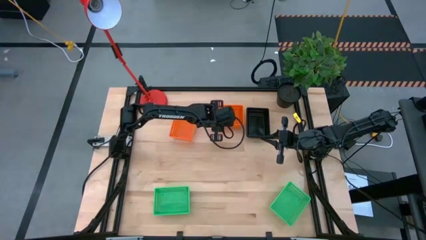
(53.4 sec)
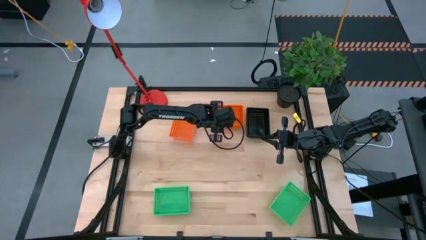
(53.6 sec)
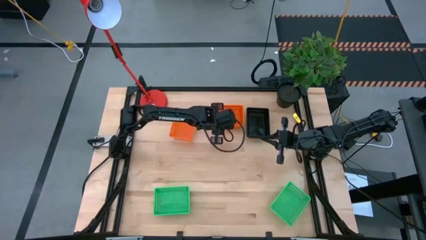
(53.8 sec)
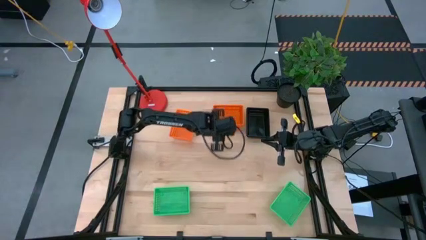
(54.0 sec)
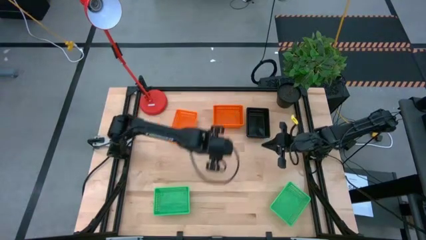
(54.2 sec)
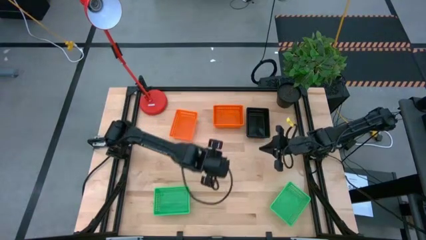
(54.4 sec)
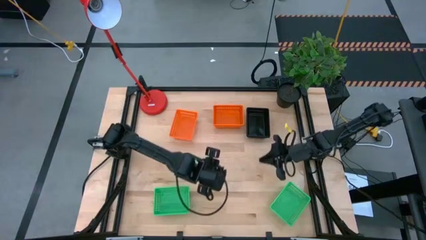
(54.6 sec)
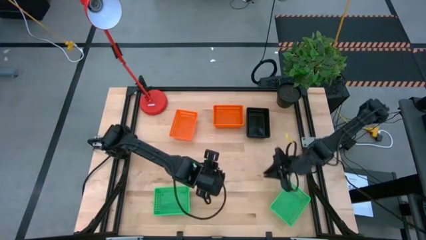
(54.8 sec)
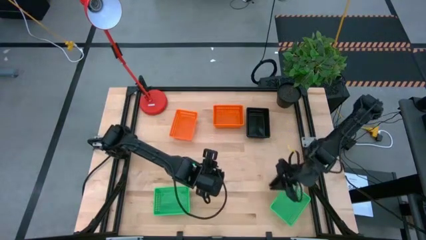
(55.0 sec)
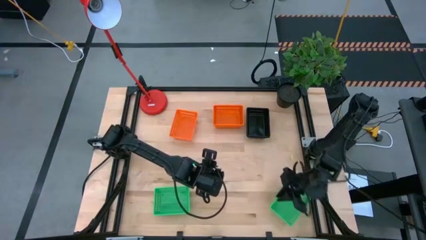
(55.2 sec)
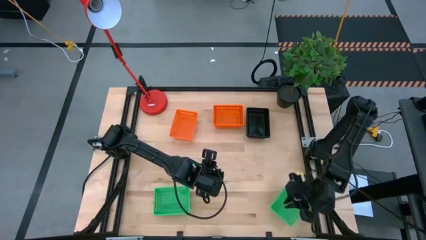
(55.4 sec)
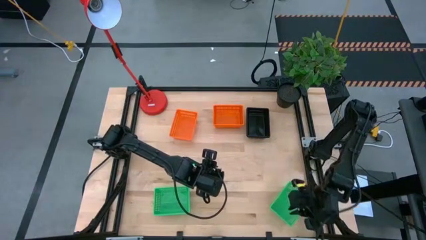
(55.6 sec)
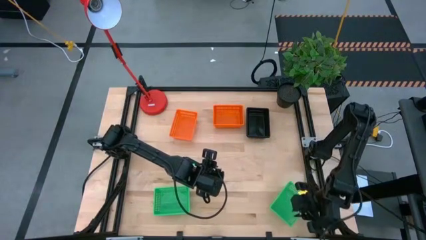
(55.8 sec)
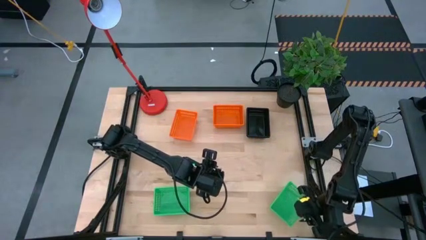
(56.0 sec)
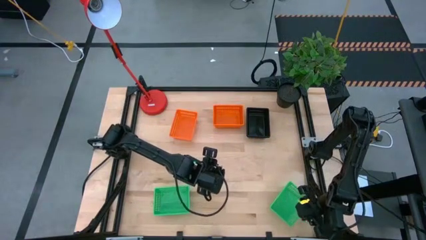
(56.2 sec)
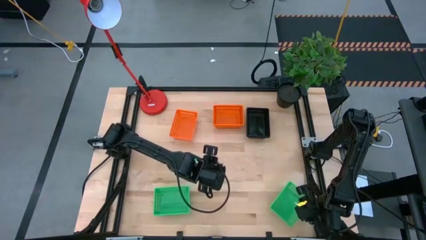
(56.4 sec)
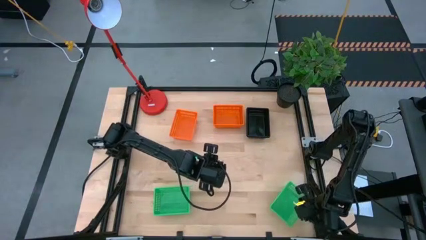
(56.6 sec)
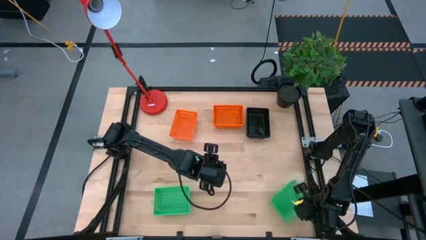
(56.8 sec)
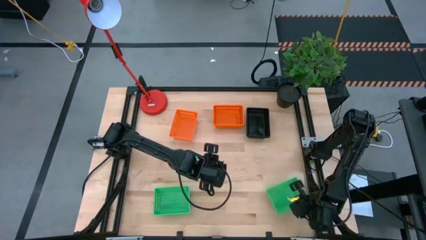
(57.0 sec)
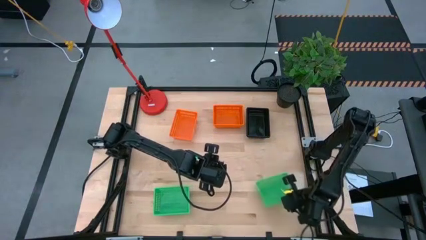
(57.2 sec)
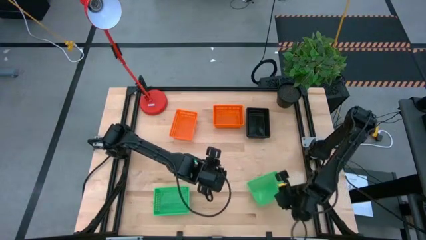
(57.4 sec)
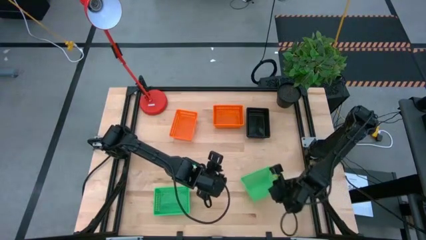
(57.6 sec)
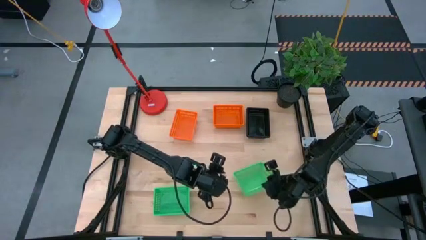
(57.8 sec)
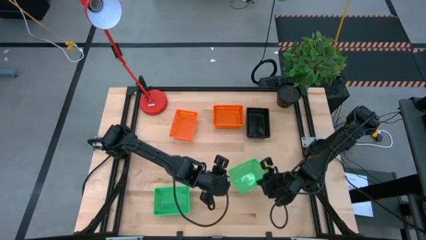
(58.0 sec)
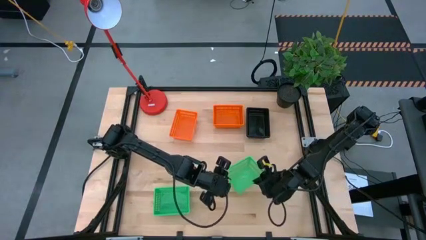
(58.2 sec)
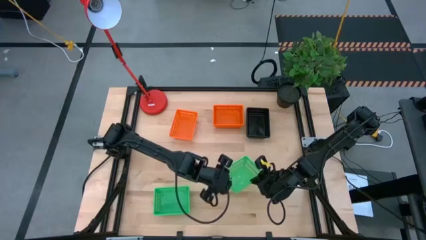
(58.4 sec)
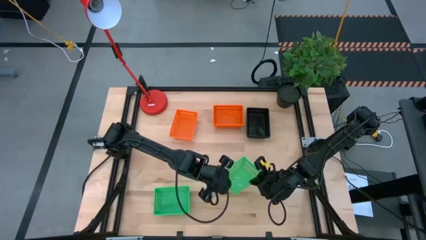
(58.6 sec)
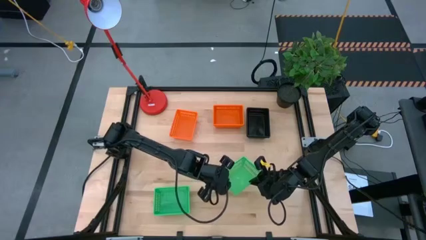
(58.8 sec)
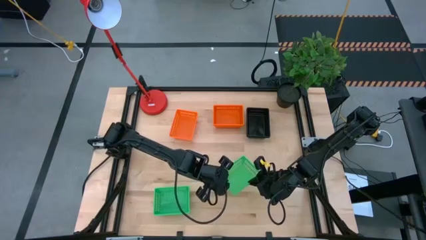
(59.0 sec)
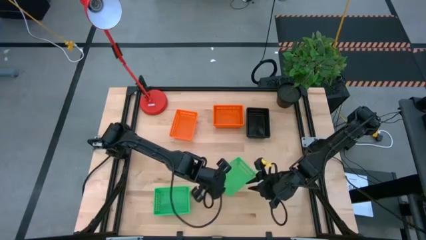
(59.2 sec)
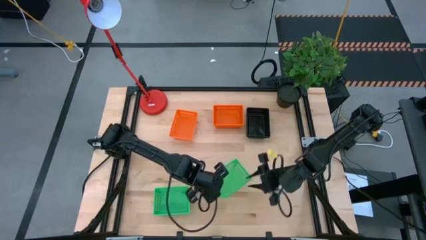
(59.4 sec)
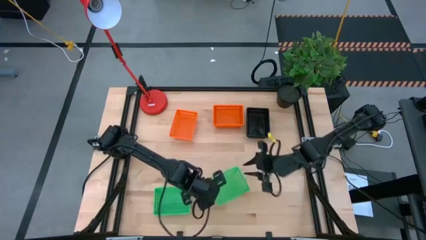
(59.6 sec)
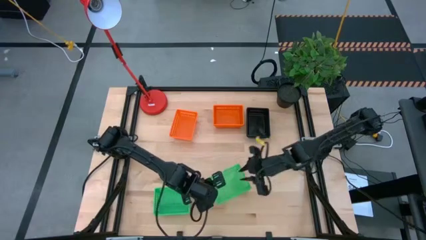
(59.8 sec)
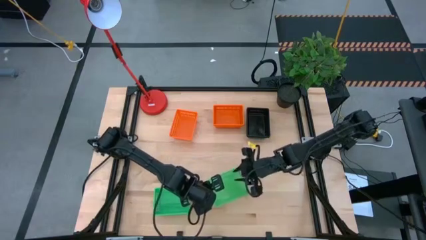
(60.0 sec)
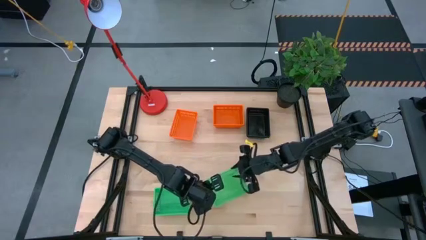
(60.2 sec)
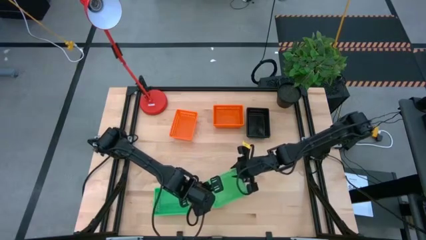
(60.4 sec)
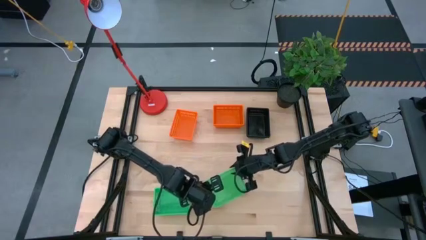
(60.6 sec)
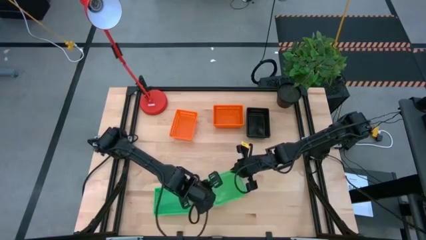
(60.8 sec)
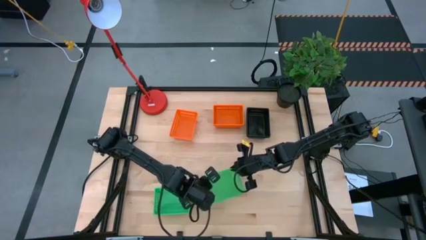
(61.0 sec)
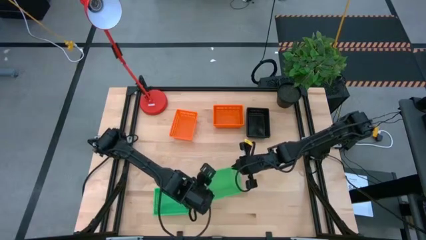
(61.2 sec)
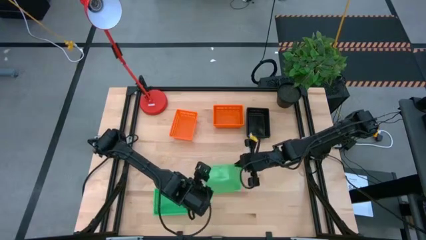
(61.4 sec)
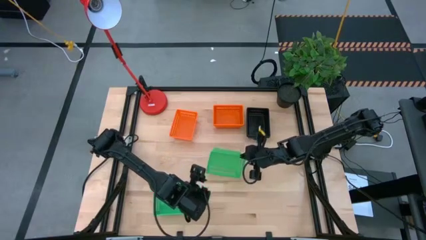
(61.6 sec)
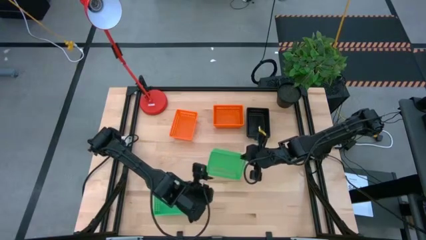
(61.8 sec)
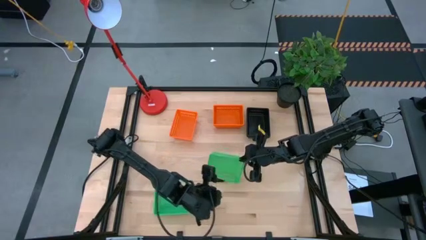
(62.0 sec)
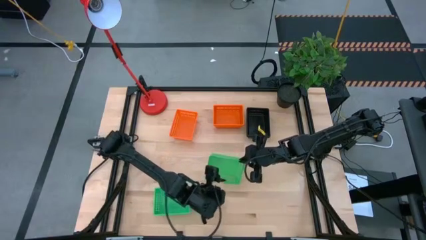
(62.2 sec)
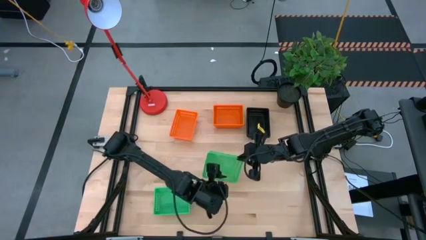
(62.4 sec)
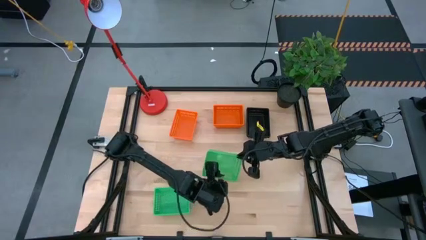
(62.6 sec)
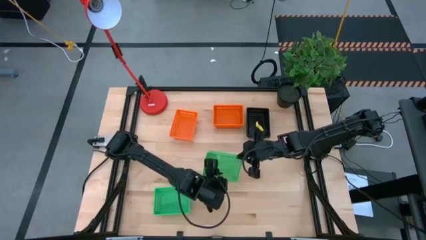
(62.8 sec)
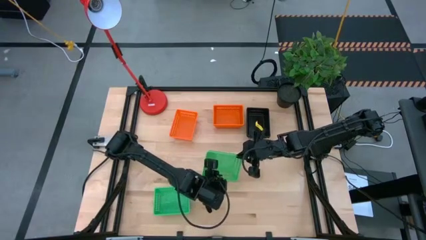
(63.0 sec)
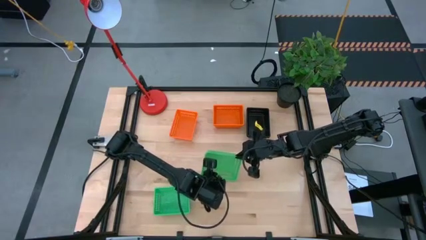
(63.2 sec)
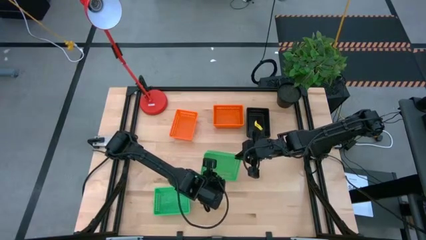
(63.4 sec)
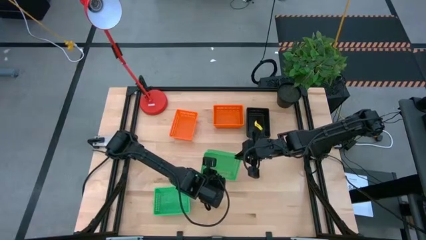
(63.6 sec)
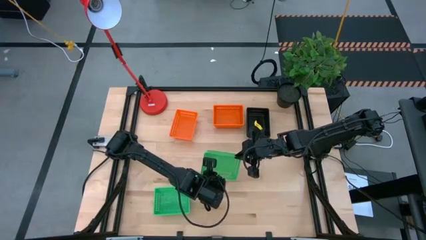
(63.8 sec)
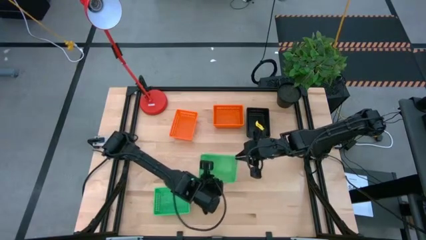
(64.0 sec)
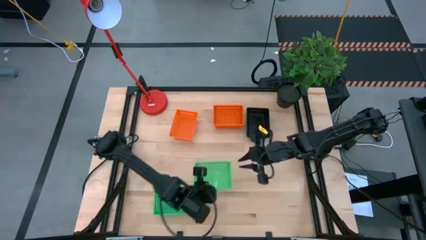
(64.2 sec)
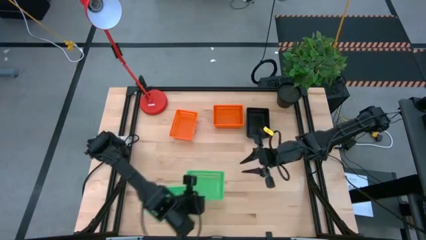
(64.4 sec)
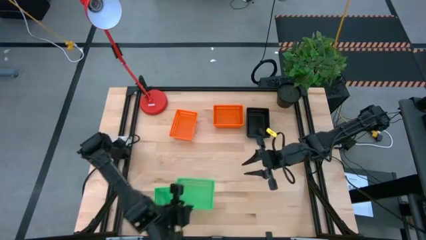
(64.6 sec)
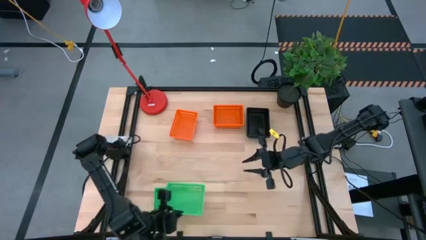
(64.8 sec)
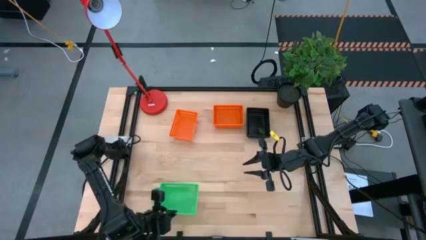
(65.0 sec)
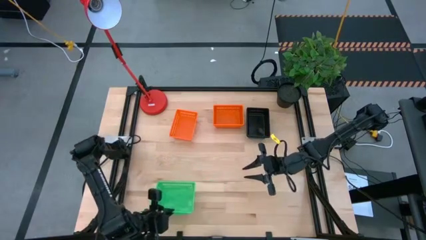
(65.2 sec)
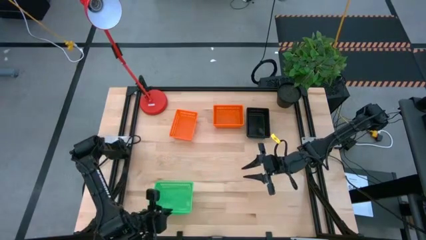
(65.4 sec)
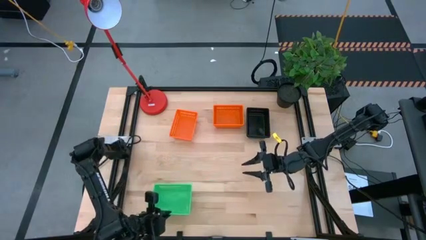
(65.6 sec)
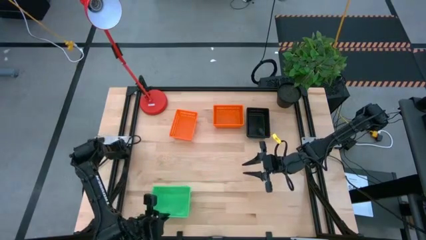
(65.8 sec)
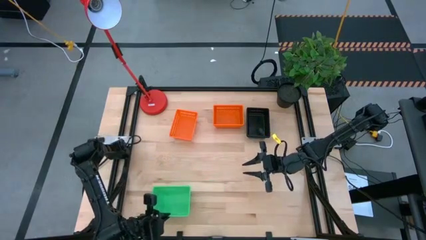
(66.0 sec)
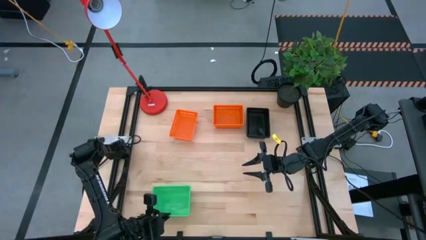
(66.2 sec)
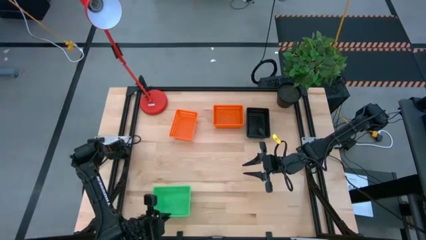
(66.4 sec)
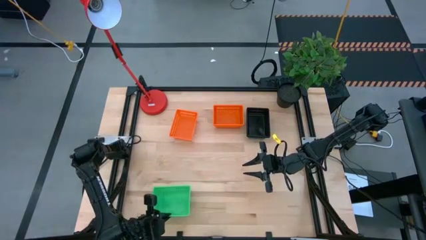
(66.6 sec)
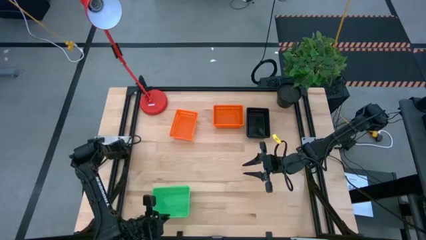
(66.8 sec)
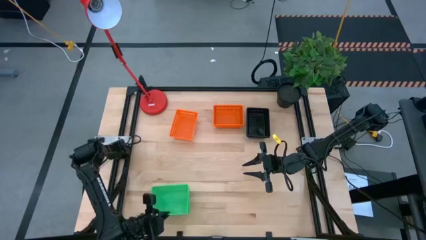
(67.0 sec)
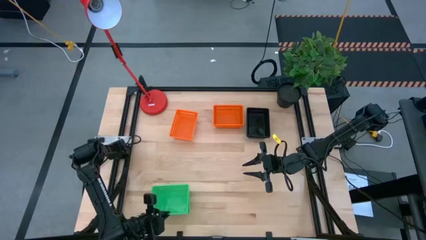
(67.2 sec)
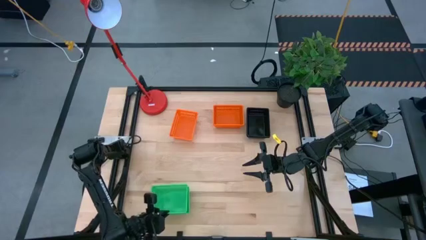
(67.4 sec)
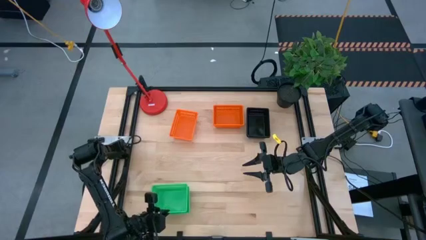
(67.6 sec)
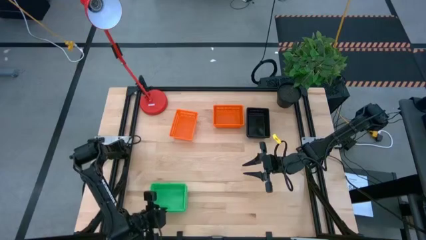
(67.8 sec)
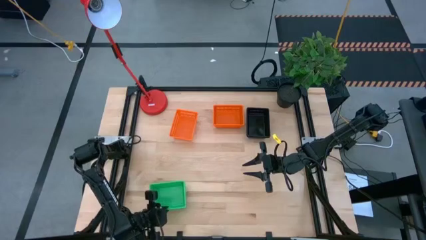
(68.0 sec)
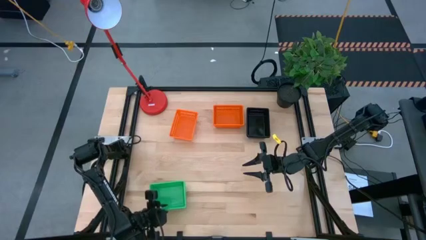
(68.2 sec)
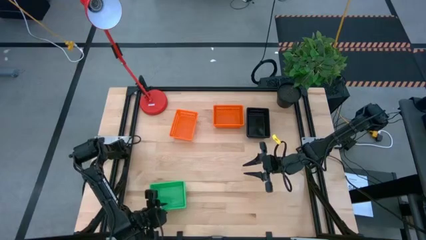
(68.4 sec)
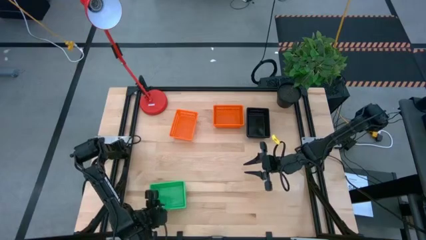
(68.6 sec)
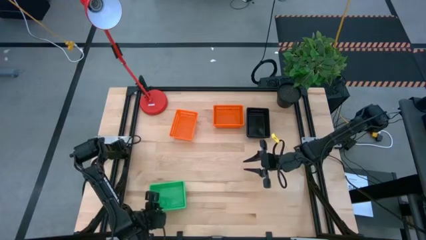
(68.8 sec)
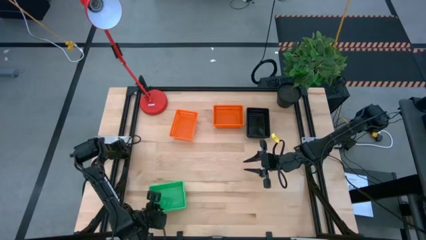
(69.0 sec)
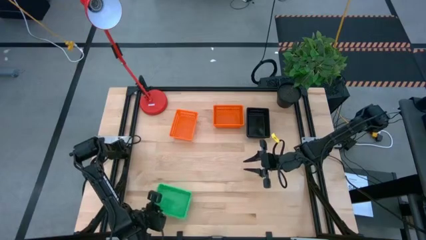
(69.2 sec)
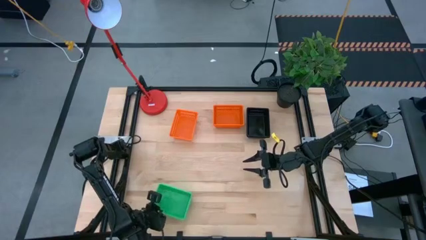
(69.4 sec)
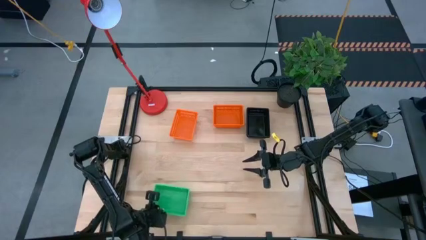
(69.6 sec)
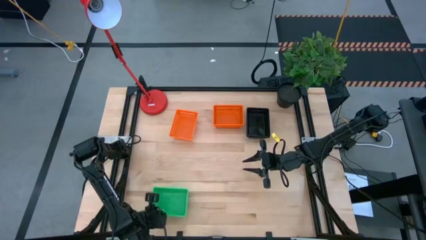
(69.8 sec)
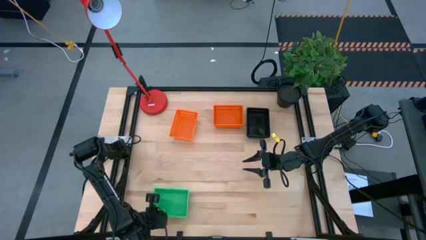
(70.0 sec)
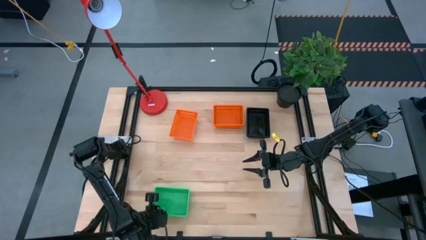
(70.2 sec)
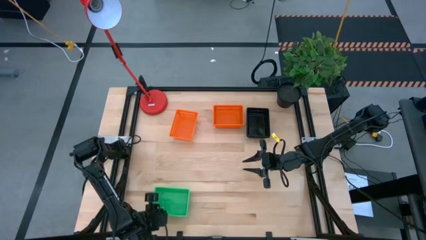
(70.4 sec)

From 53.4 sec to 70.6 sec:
Stack the right green basket on top of the green basket
